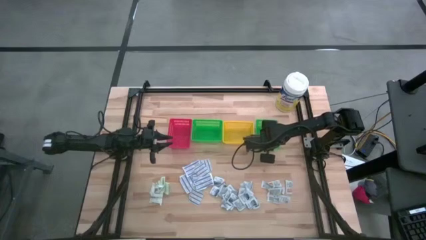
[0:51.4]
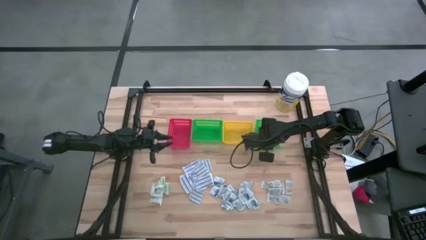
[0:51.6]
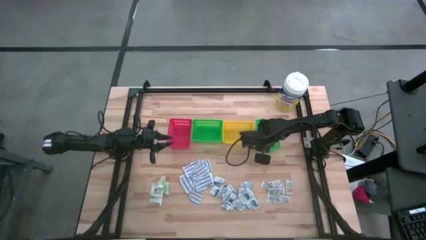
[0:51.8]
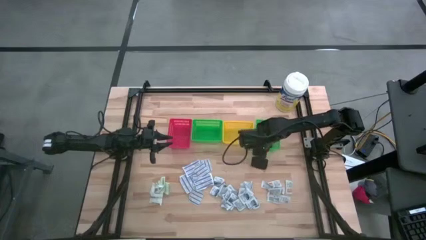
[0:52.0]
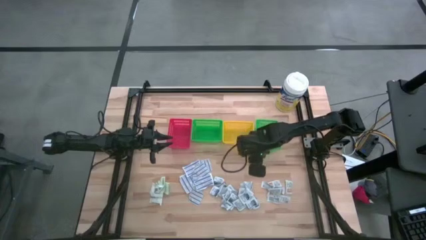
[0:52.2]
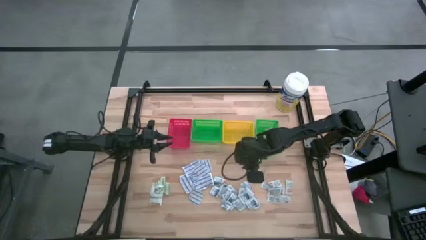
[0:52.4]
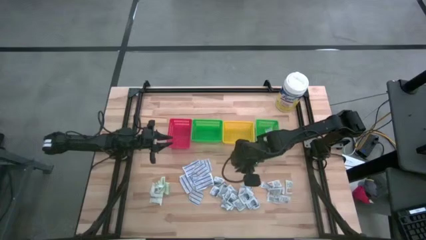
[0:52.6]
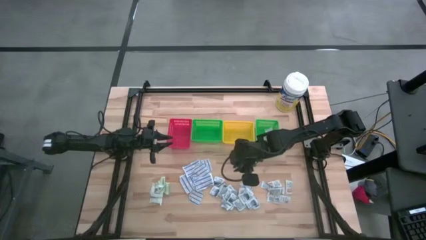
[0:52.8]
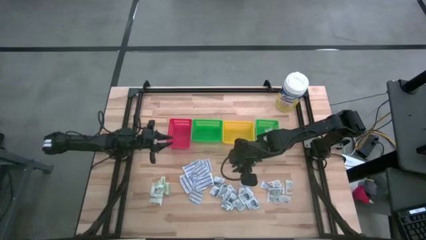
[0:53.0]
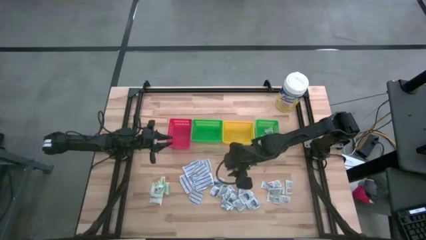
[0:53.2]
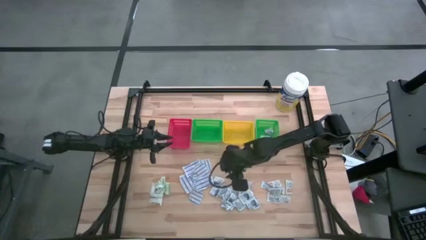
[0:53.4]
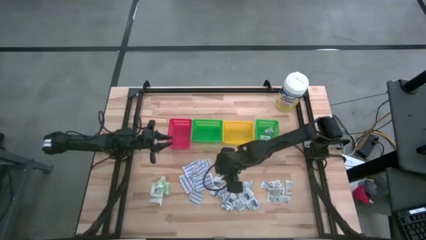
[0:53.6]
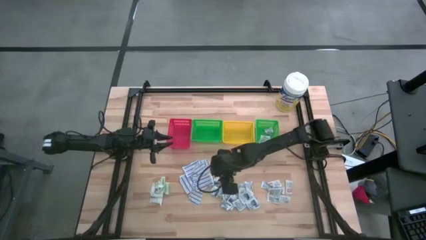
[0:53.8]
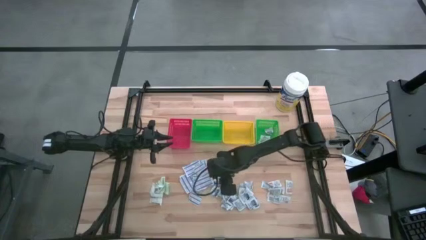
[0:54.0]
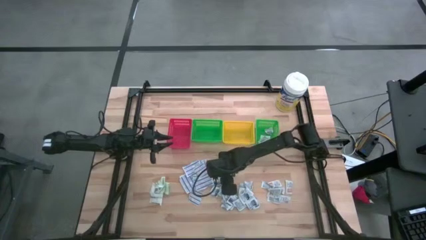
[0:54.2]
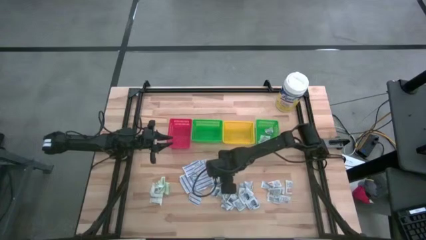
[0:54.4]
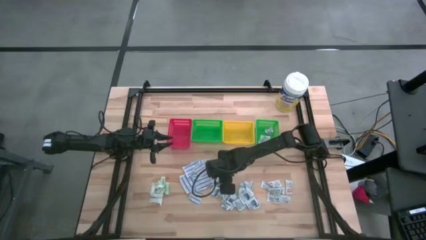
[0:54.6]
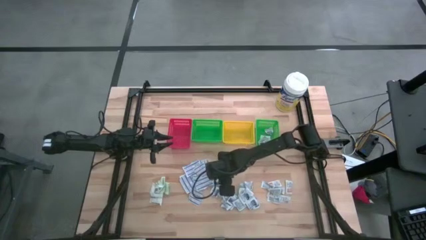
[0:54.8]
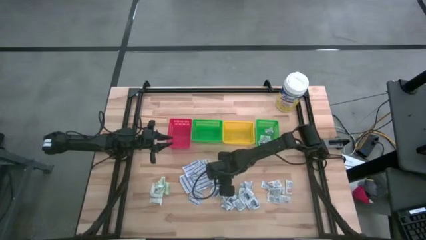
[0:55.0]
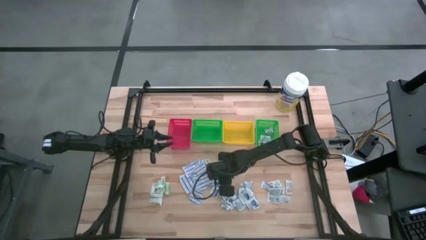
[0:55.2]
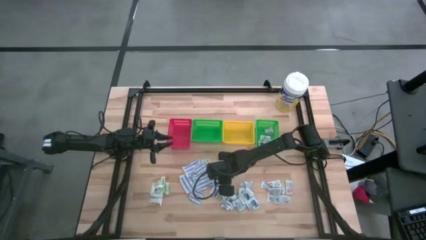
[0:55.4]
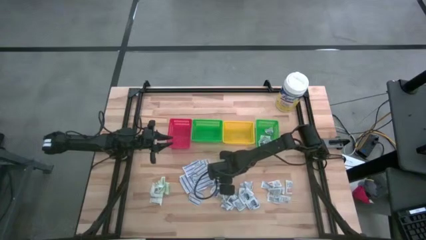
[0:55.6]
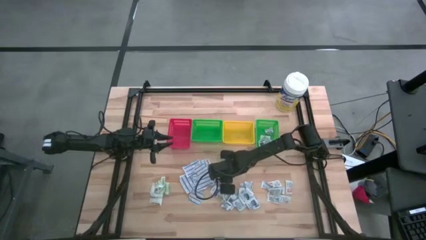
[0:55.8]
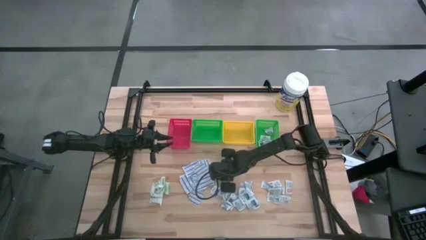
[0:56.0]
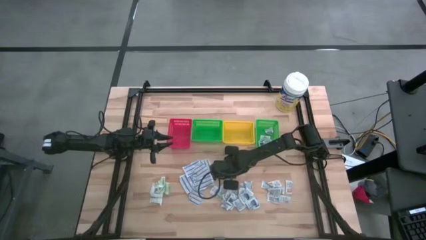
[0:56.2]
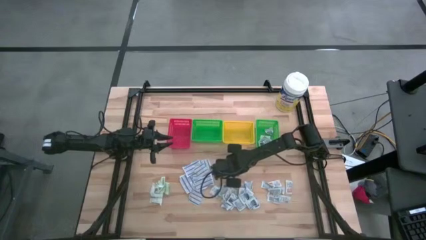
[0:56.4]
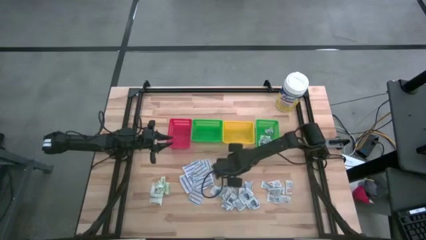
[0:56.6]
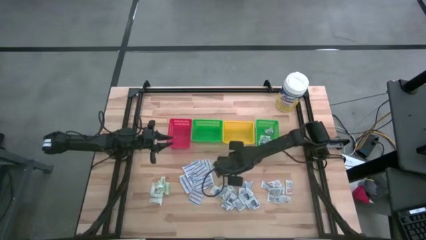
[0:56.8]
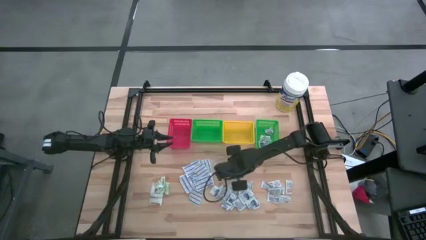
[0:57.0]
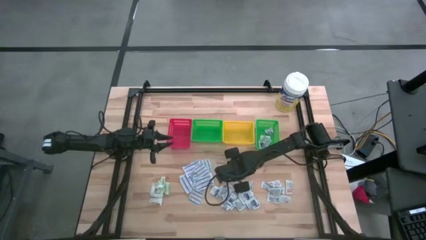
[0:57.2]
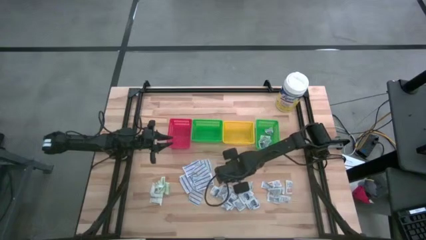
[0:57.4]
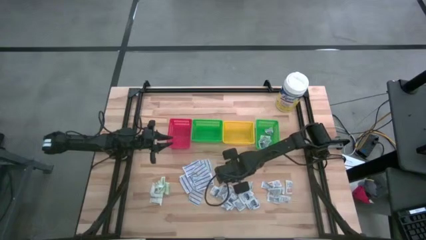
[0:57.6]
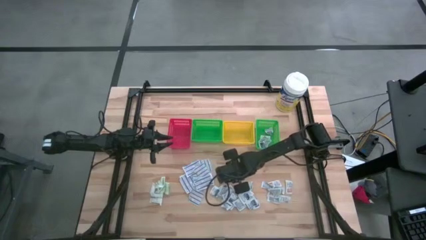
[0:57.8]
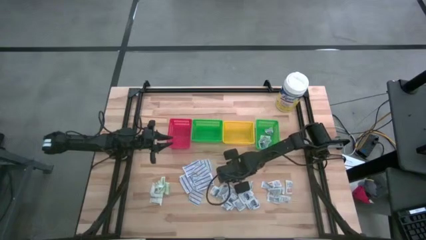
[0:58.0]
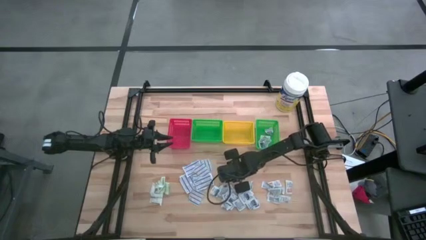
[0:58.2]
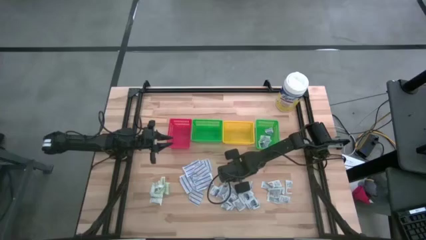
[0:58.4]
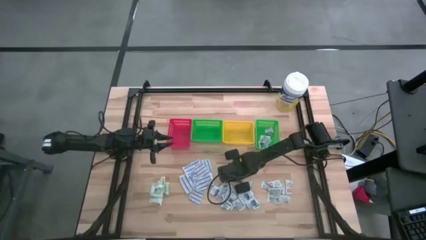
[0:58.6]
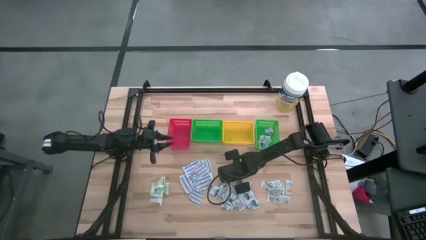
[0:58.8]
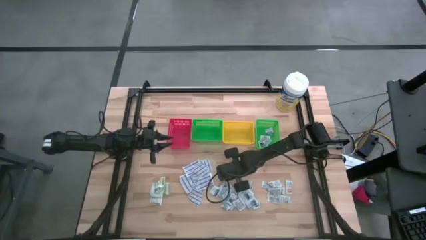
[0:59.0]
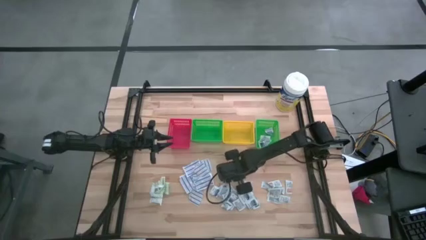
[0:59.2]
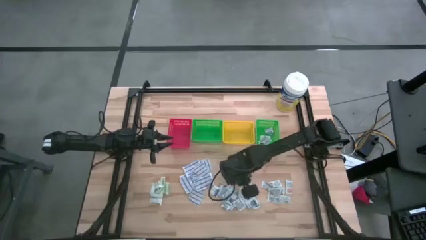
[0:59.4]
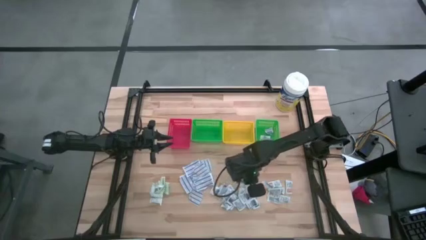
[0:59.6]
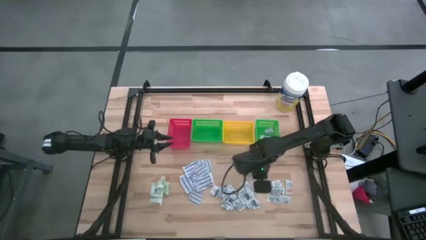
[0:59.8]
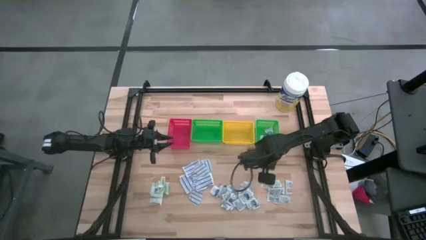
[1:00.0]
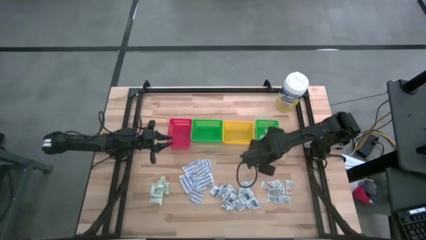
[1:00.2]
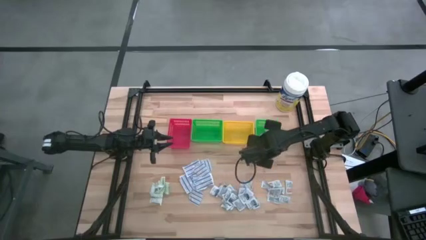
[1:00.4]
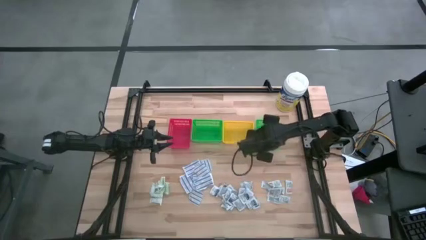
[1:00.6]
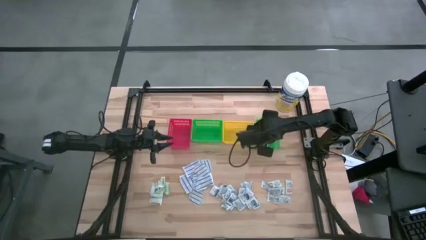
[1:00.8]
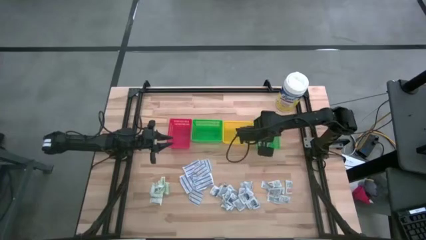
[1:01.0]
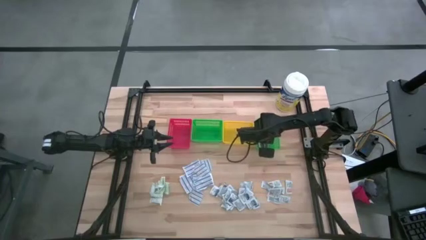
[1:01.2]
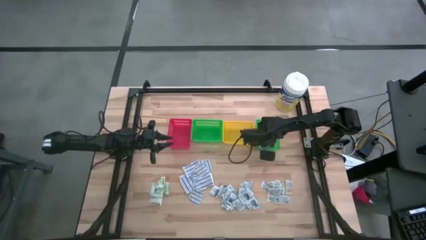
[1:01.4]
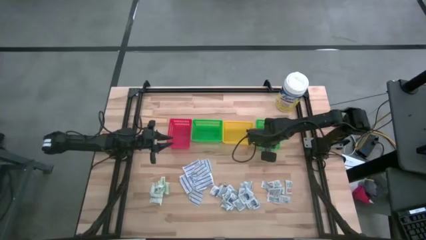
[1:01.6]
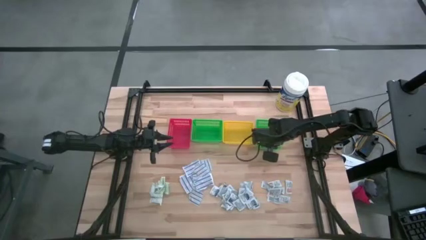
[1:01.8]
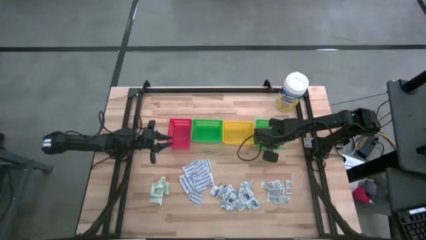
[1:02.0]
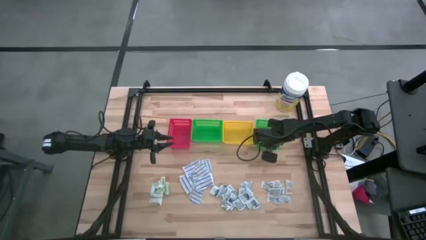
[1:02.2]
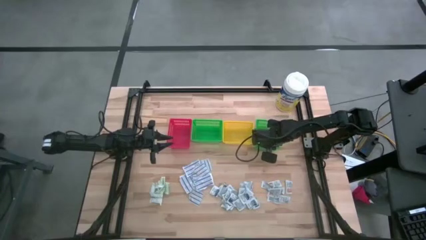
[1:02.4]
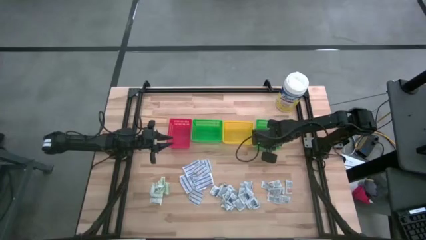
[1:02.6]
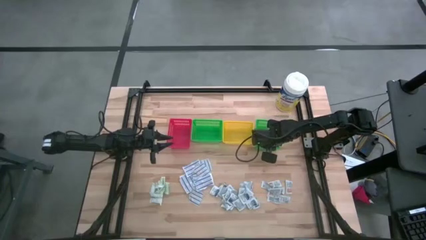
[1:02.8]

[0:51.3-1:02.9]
Task: Pick & Place First Aid Supplies
Put the blue alcohol pad into the right green bin

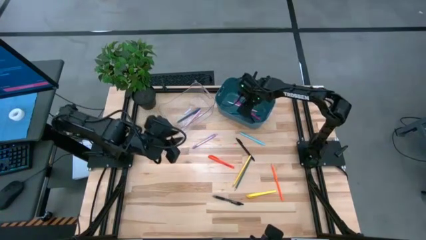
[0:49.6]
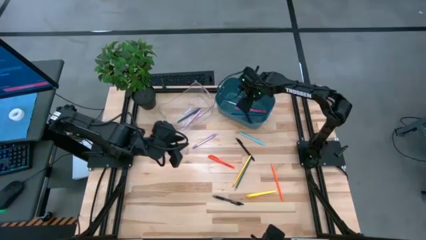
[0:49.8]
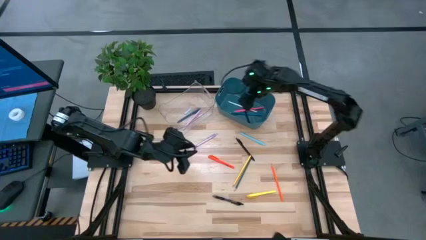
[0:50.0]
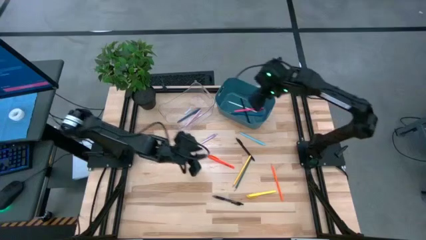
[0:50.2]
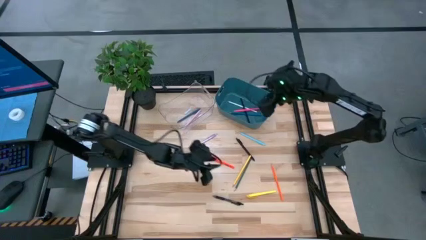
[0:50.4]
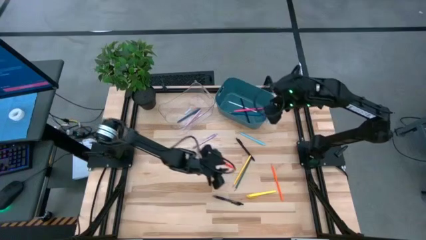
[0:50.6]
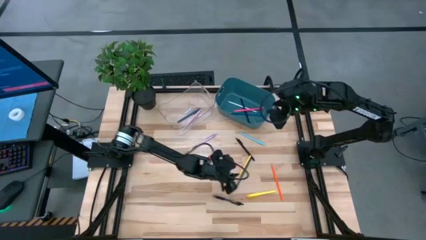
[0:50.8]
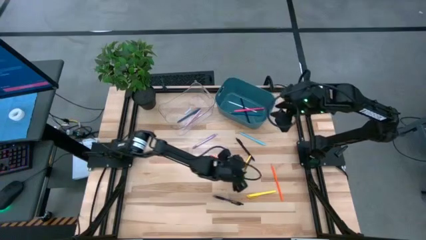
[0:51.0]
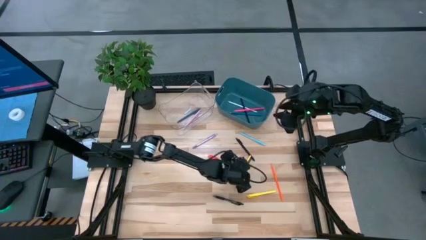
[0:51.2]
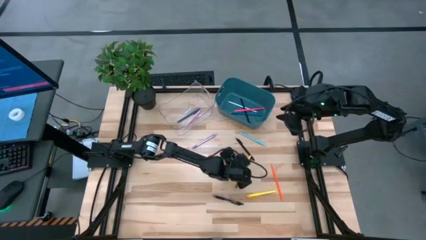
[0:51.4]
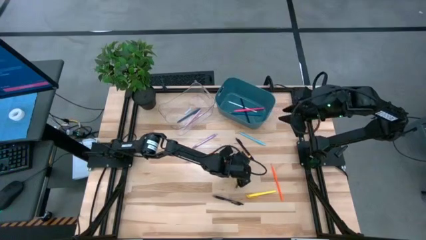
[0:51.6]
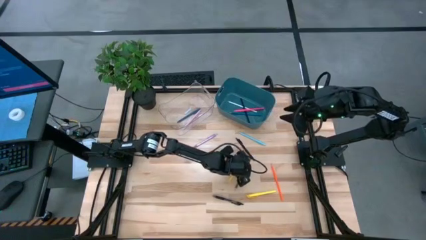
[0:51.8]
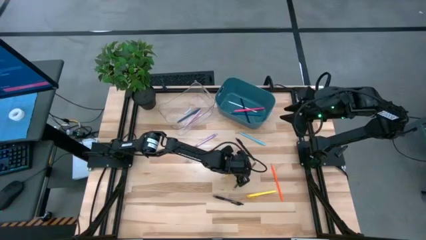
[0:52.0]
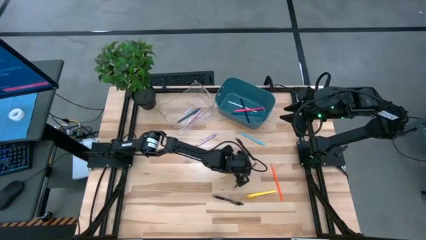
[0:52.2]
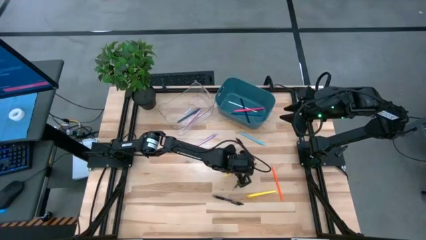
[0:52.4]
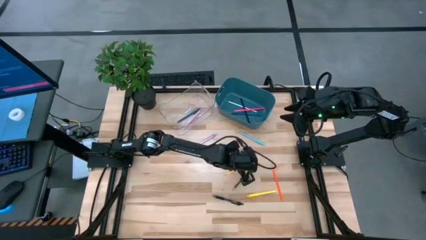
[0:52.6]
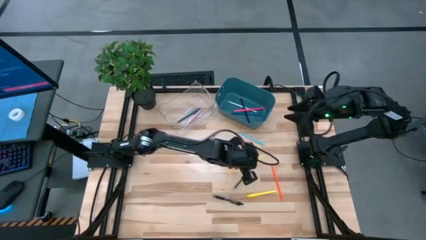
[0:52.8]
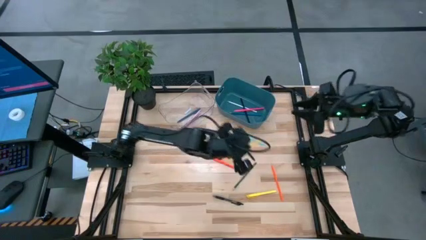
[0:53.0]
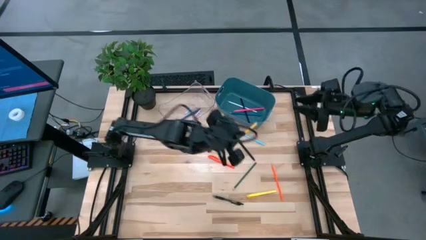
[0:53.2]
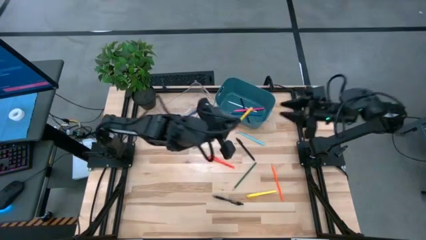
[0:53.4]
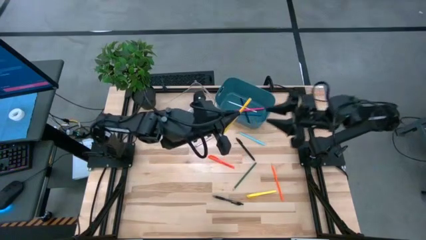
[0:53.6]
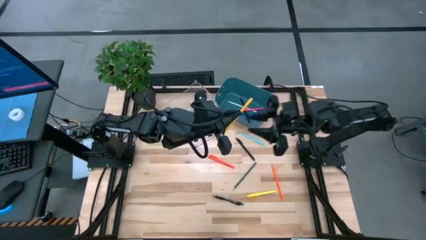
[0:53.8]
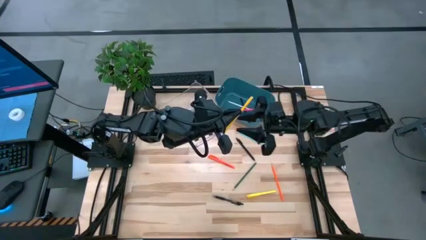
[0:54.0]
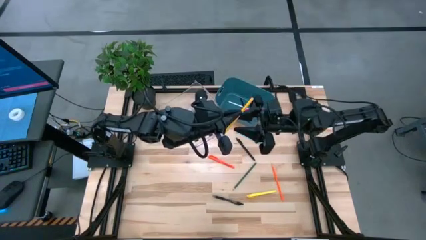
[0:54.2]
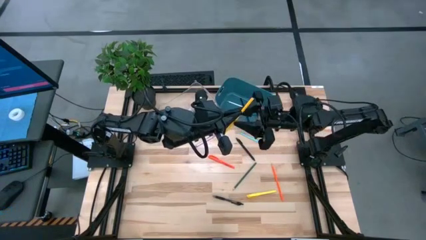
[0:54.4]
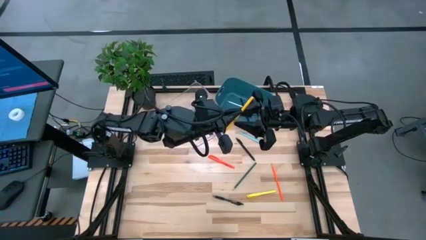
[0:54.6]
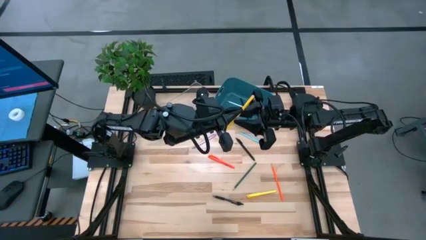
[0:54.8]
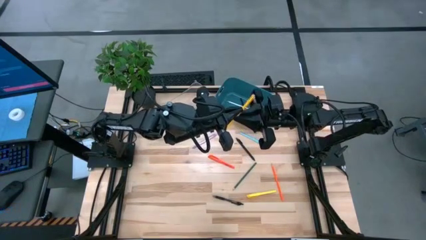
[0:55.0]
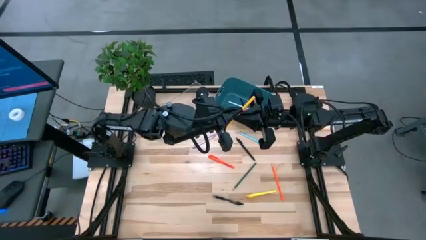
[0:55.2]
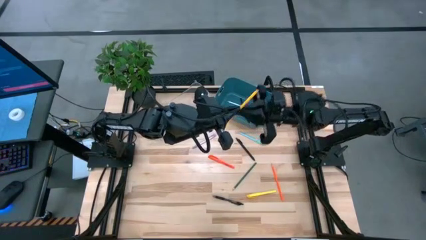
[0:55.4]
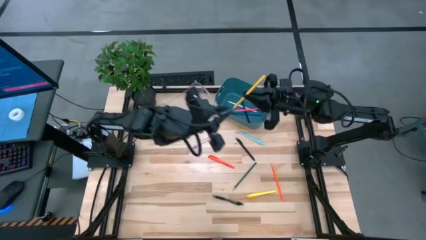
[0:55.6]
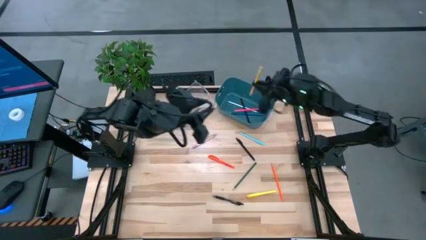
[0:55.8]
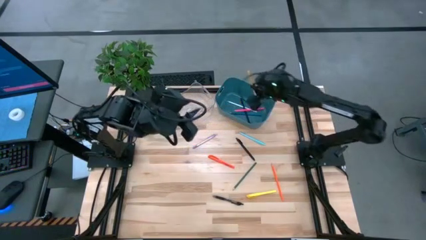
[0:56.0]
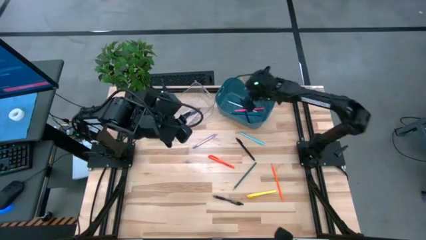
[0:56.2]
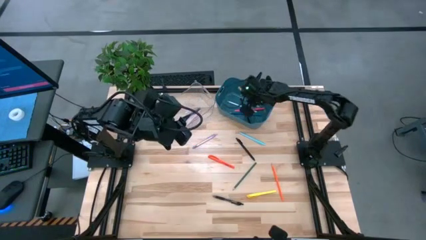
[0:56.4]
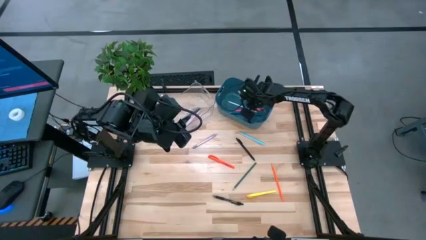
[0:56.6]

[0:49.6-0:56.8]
Task: Sort pens & pencils
Put the yellow colored pencil into the blue bin
